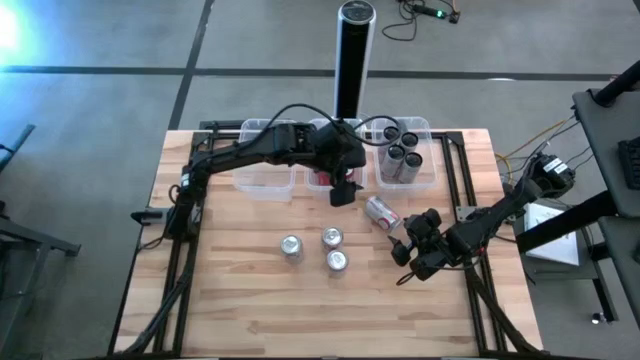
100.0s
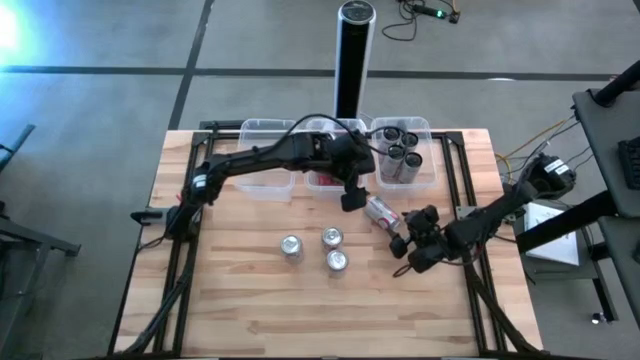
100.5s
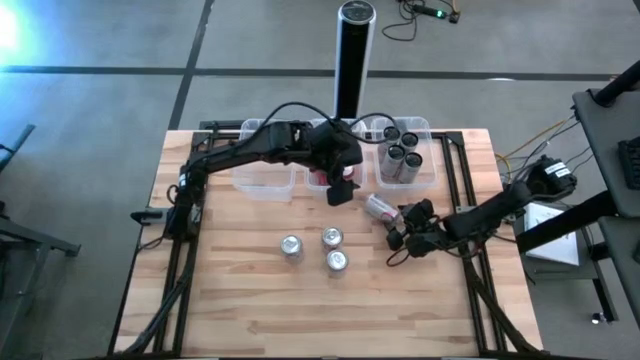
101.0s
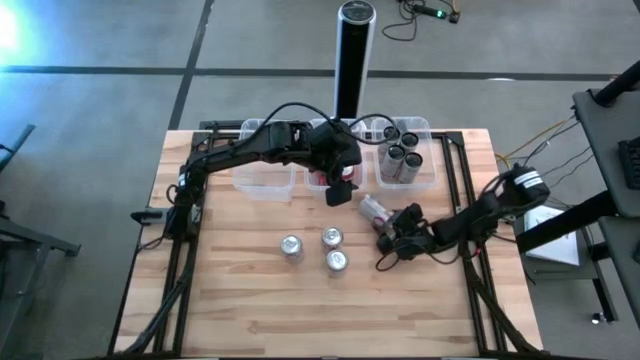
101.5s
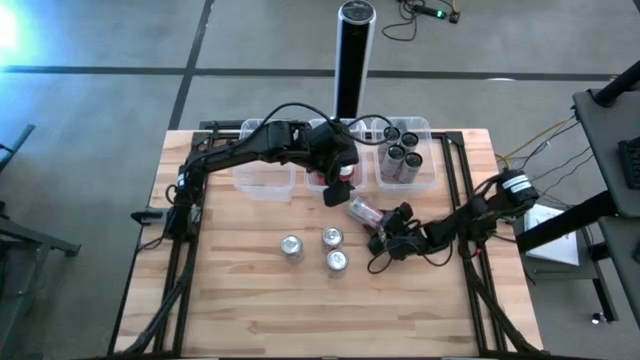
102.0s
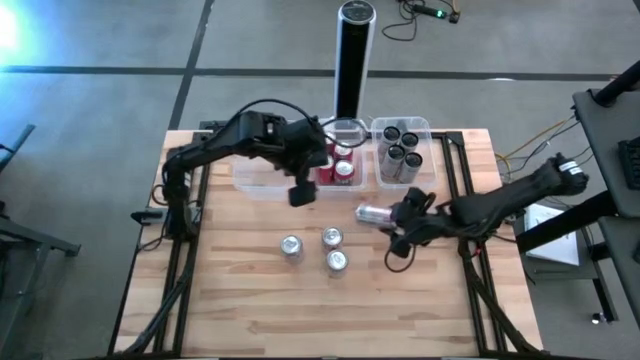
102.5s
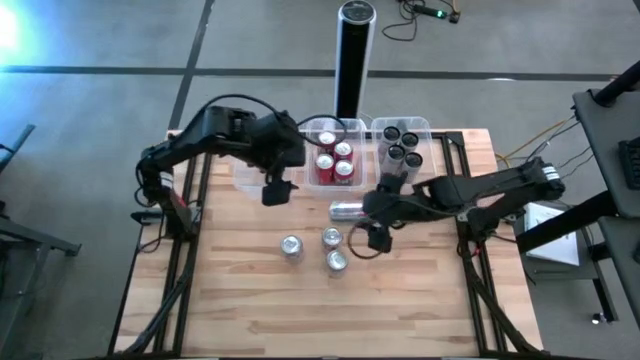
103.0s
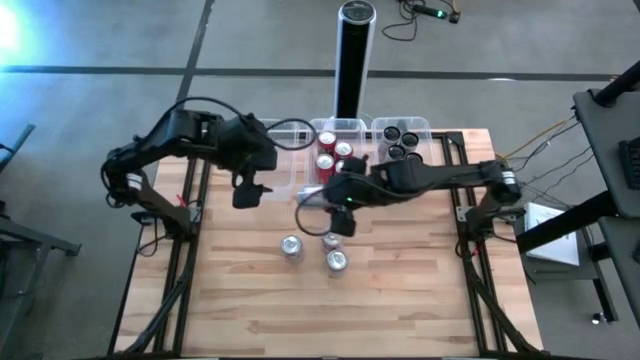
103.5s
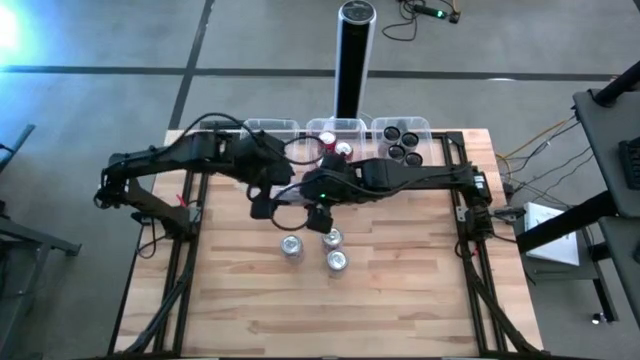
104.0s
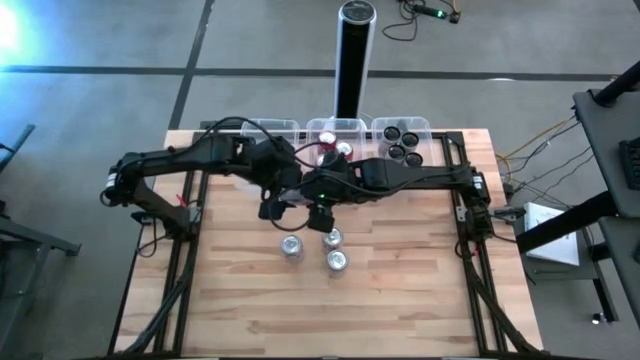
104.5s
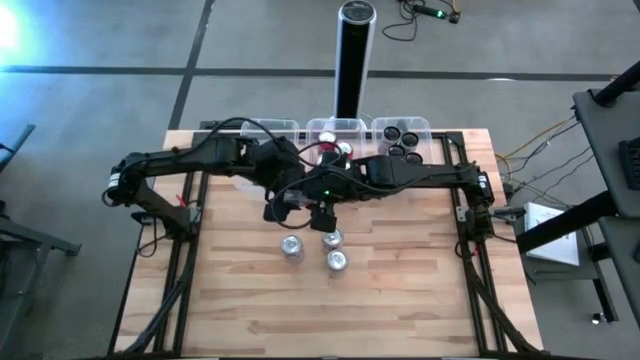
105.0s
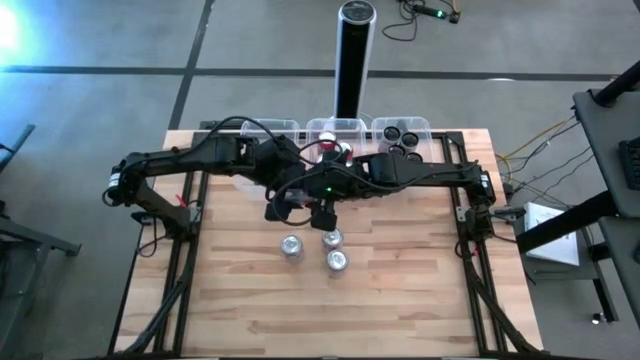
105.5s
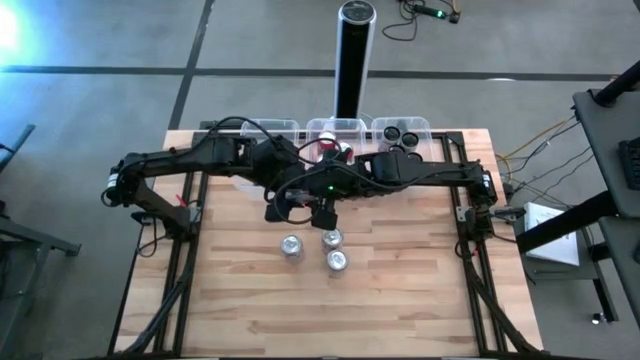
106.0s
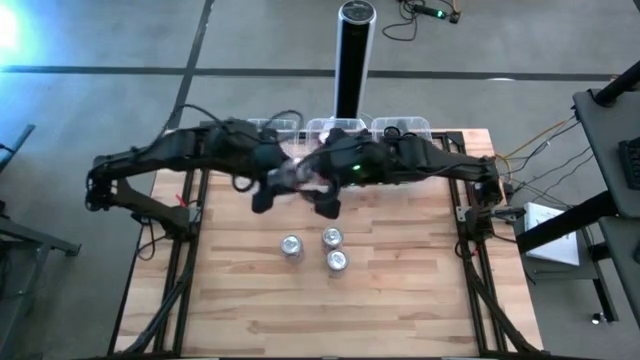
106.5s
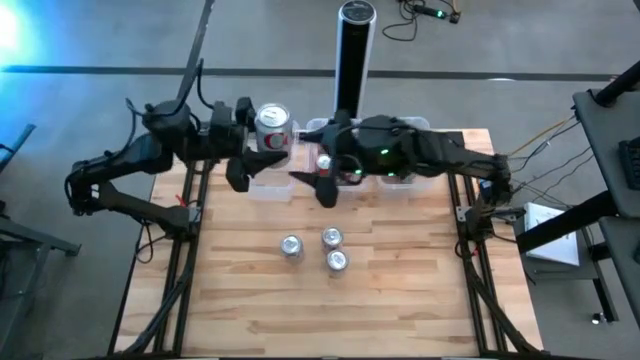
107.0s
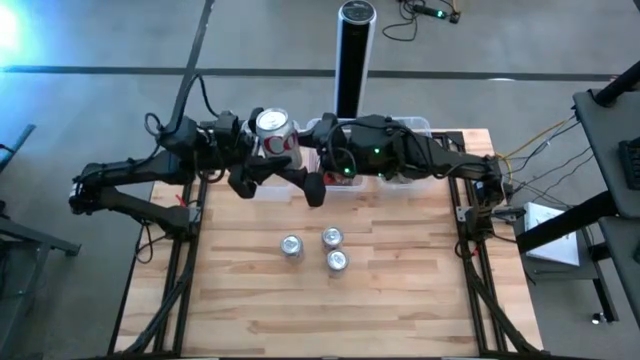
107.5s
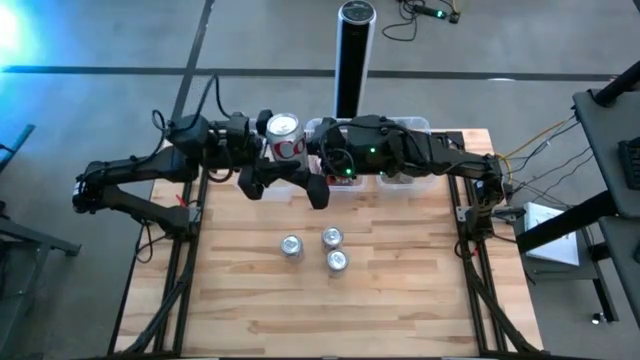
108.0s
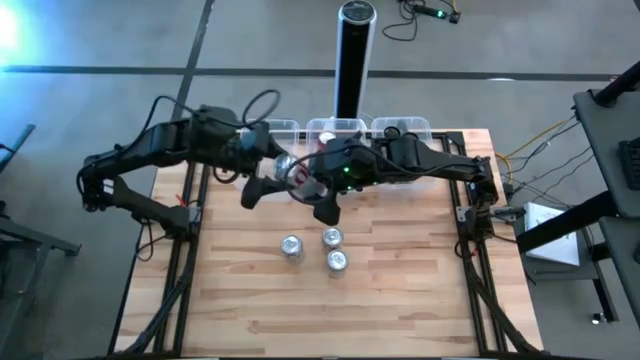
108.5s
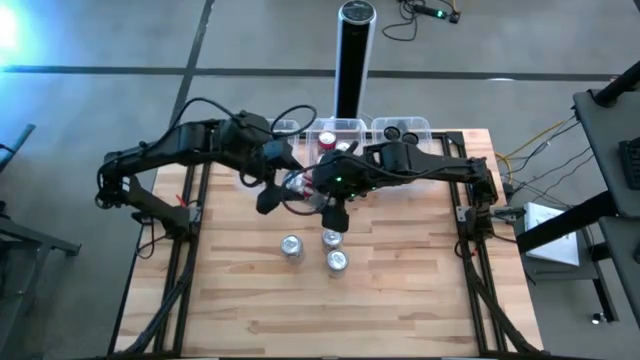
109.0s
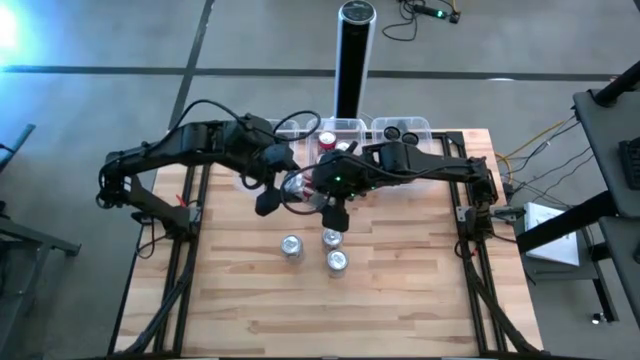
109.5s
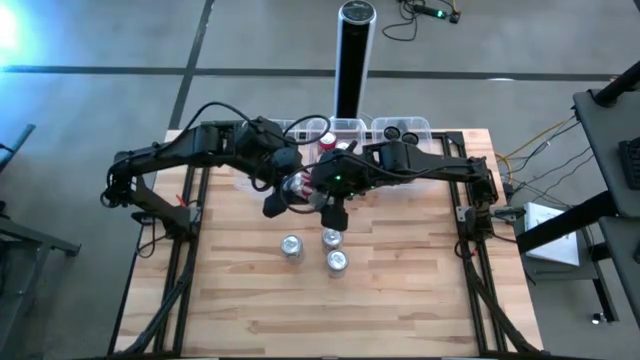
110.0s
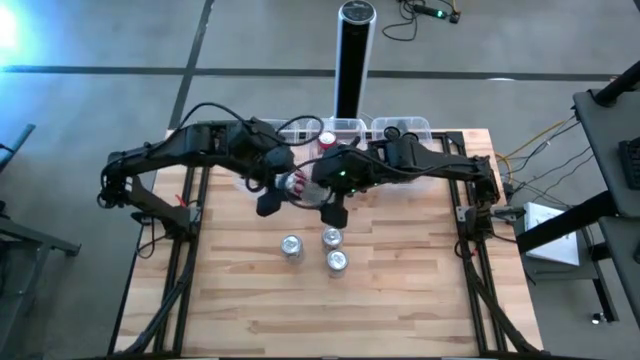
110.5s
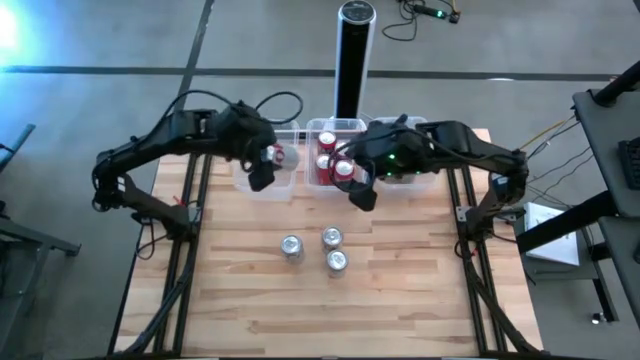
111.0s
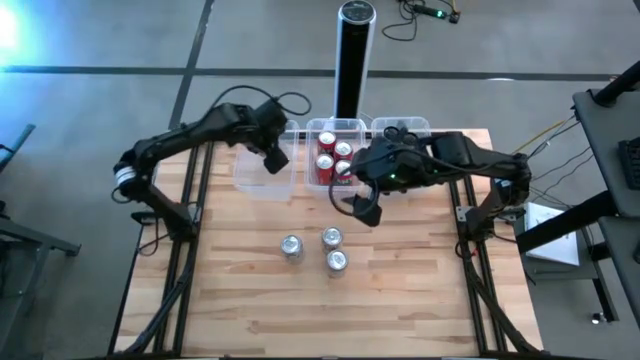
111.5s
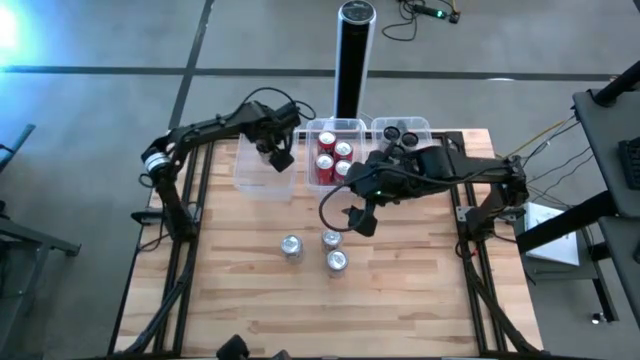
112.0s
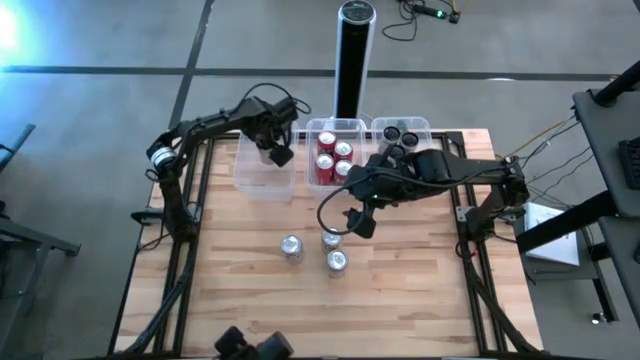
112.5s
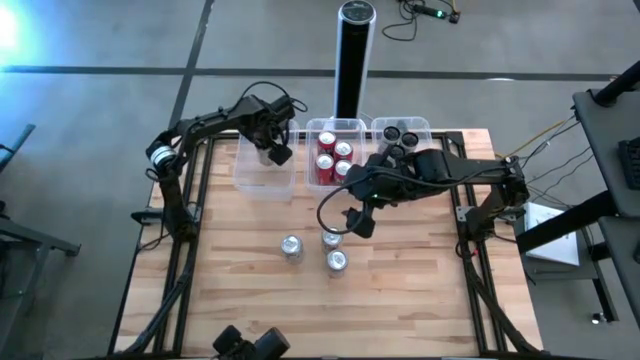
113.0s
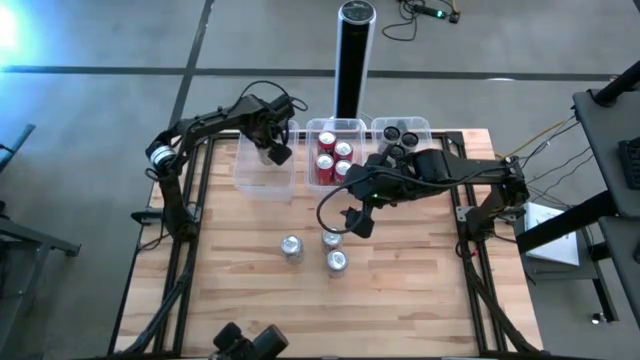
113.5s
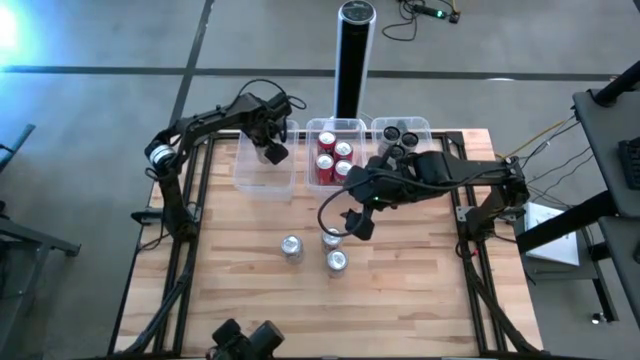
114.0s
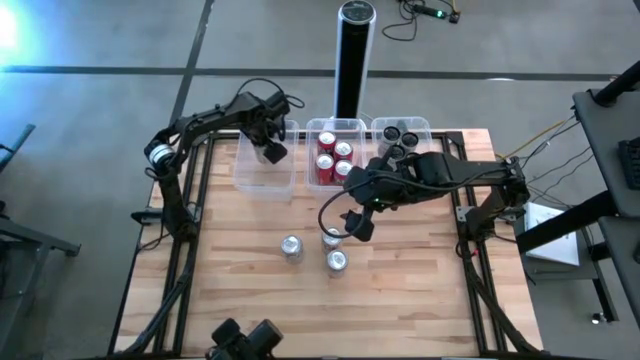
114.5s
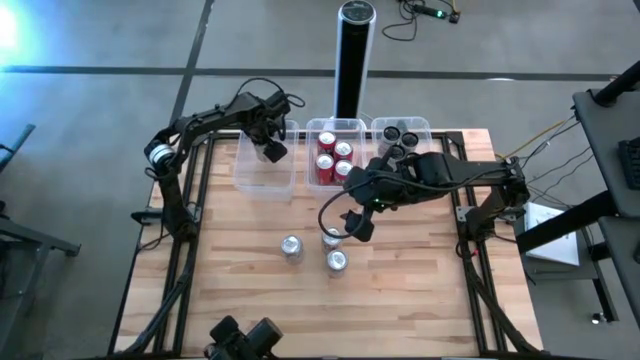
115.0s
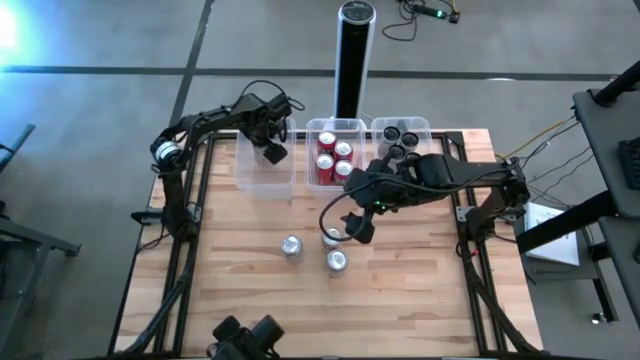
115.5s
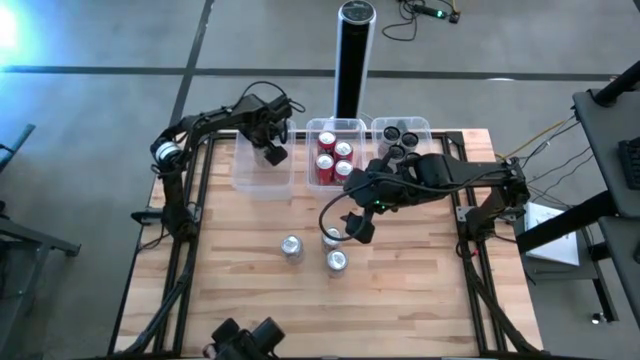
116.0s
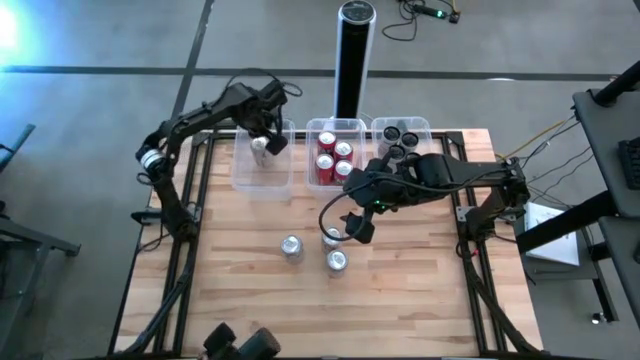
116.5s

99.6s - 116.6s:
Task: Sort soda cans
Put the red-silver soda can into the left white bin

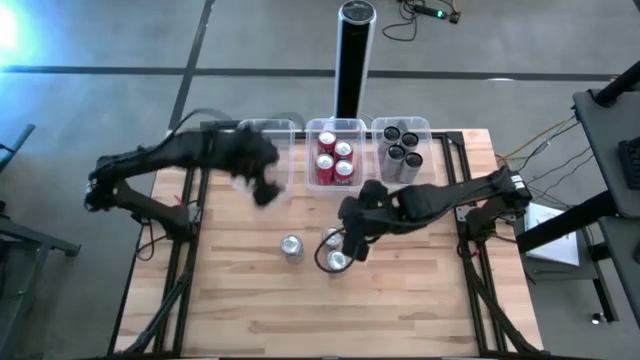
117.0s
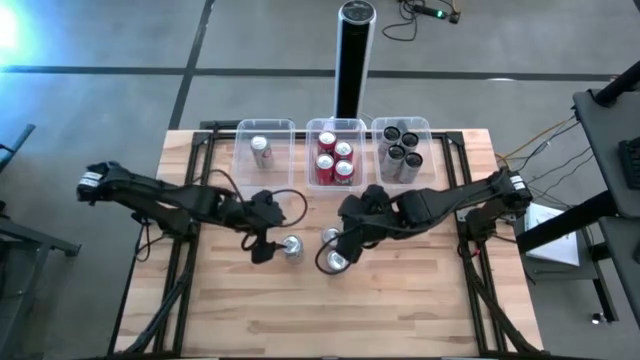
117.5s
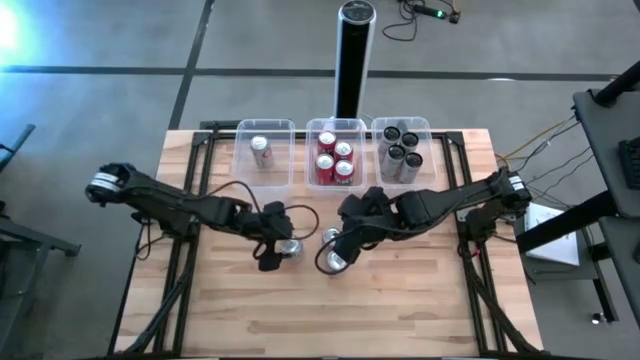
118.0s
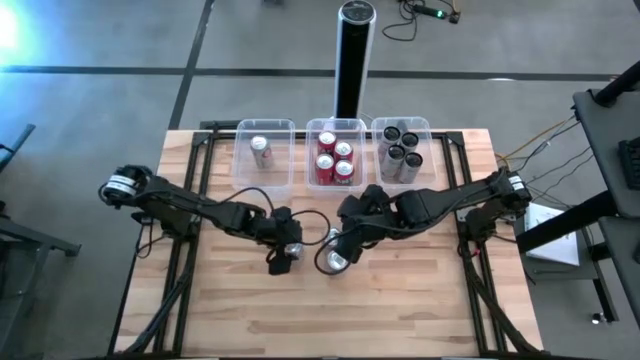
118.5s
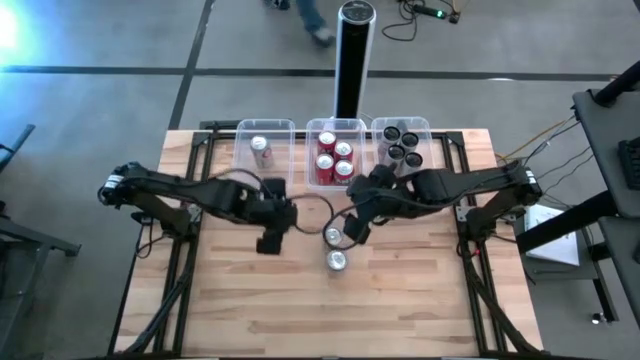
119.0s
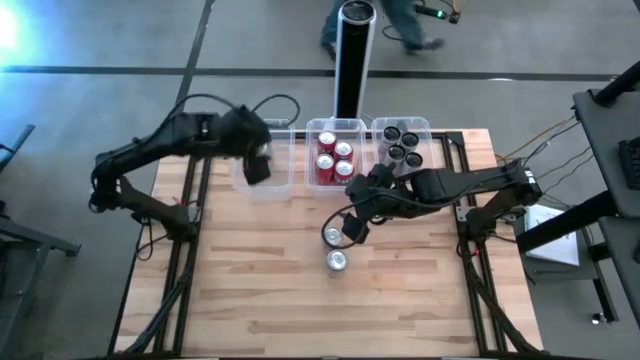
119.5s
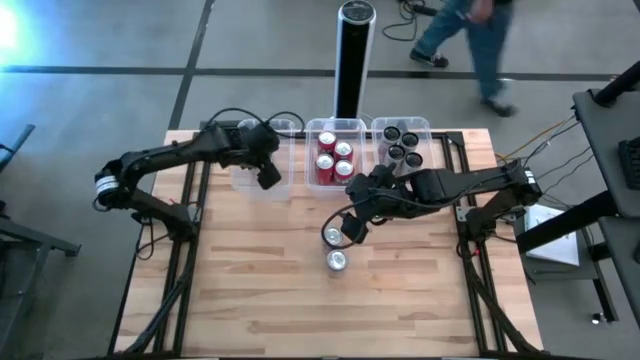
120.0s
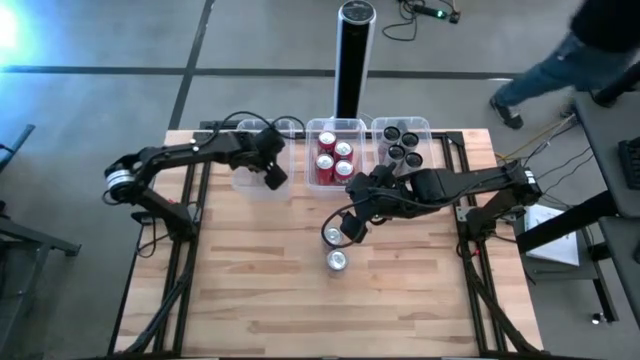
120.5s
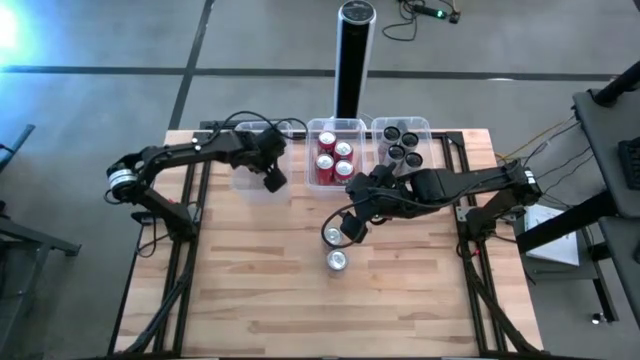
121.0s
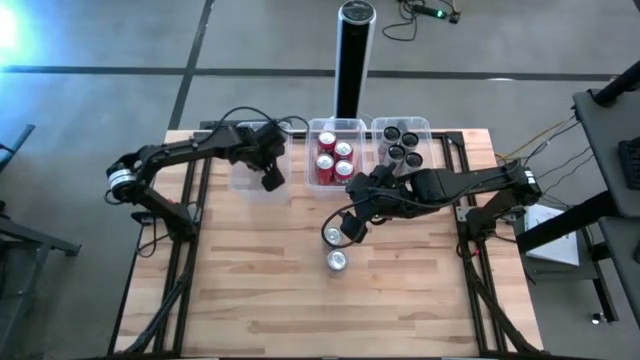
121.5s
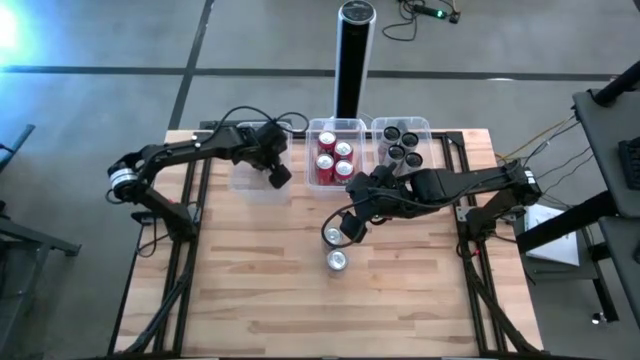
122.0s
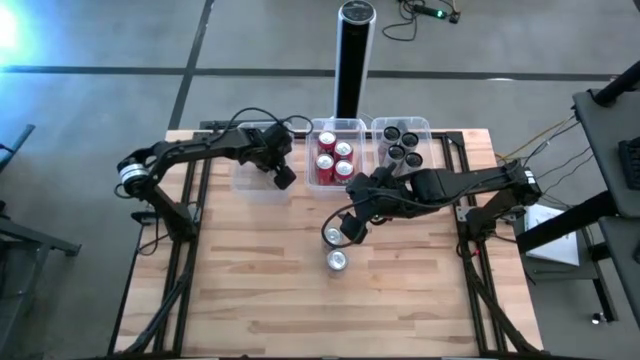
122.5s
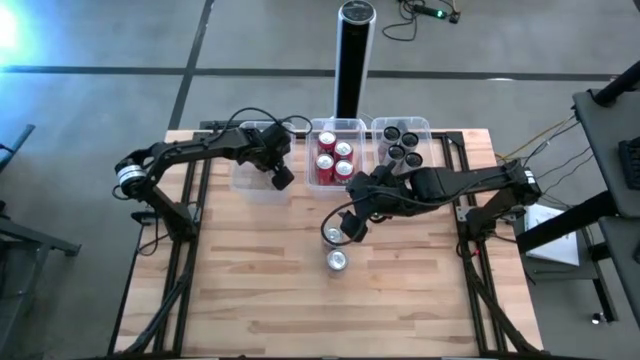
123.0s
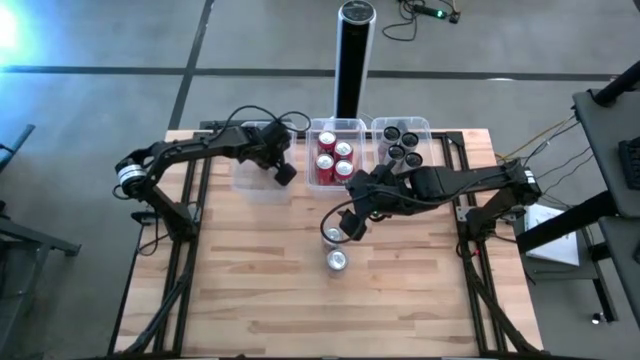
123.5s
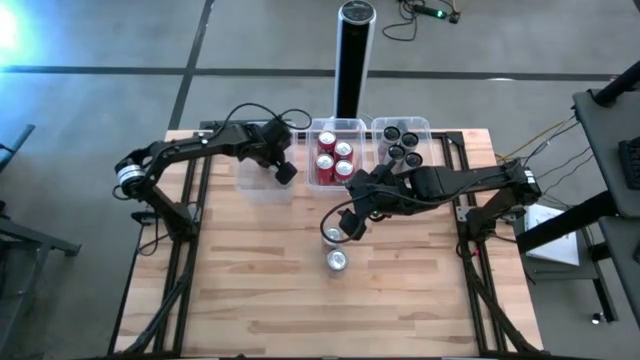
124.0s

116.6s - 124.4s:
Put the red-silver soda can into the left white bin
